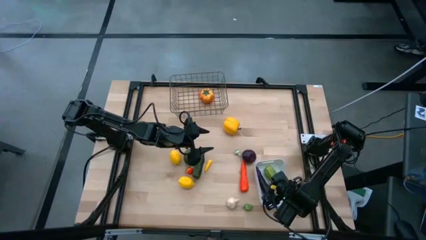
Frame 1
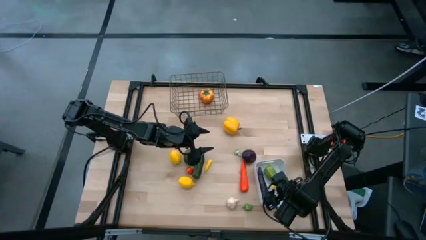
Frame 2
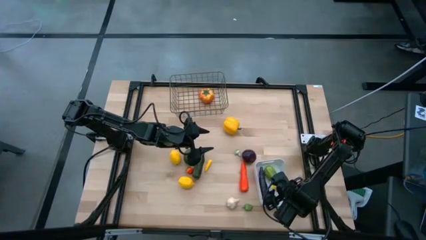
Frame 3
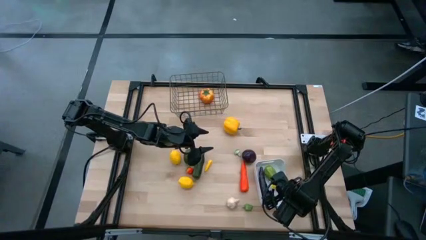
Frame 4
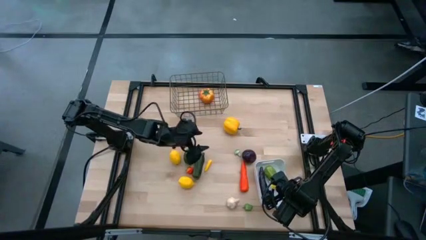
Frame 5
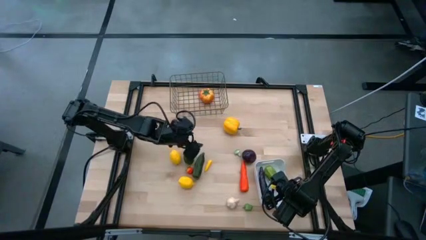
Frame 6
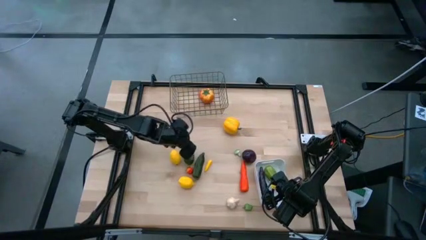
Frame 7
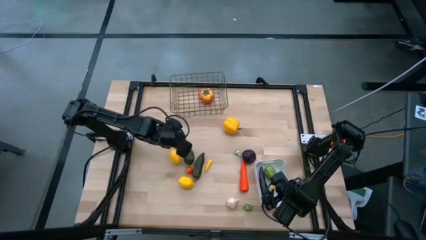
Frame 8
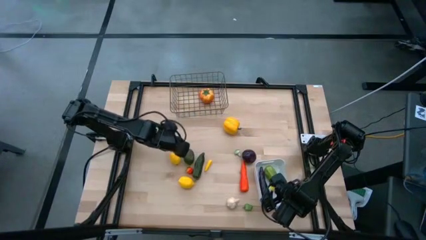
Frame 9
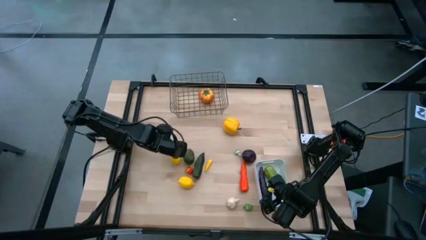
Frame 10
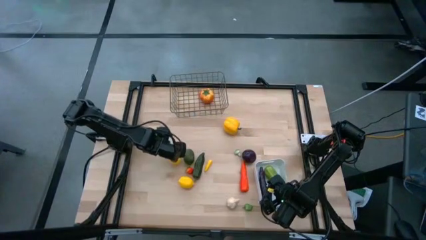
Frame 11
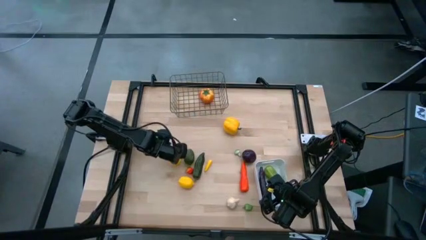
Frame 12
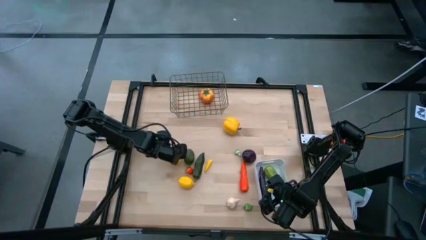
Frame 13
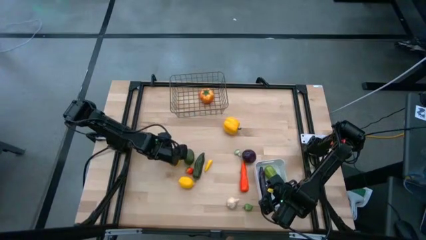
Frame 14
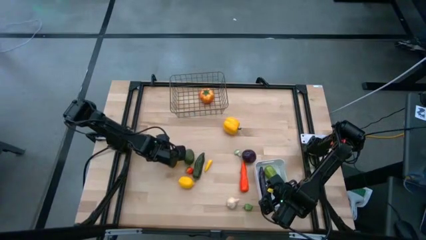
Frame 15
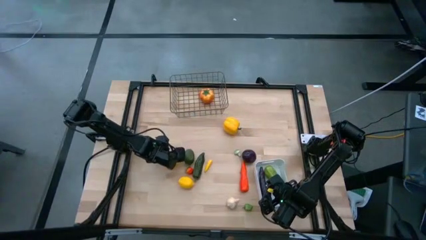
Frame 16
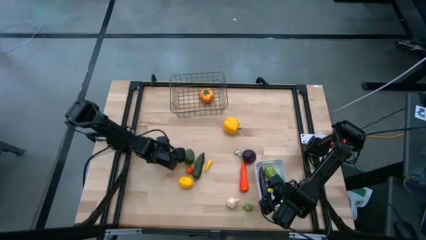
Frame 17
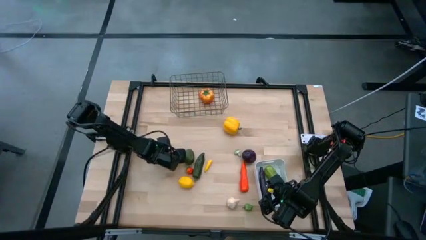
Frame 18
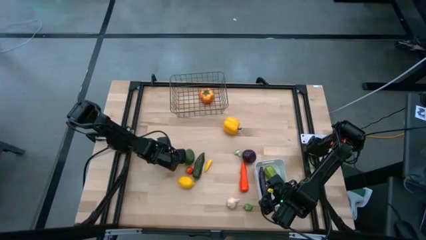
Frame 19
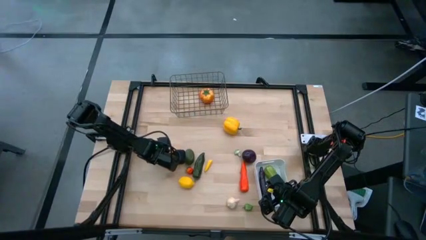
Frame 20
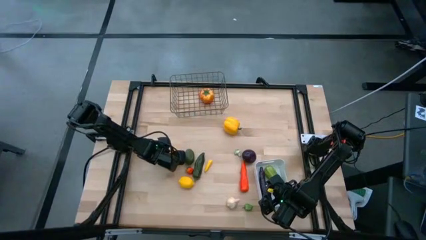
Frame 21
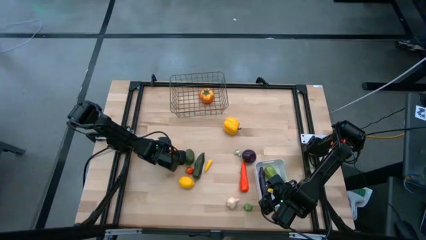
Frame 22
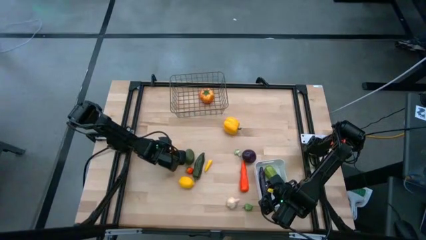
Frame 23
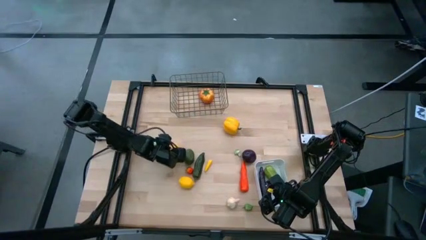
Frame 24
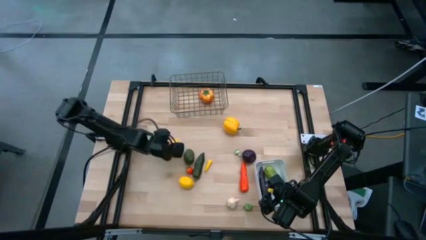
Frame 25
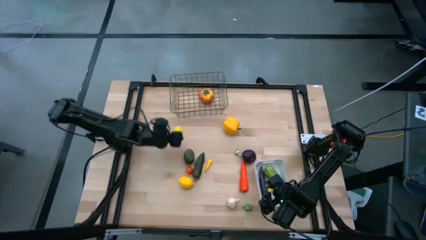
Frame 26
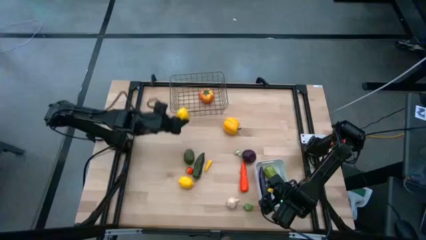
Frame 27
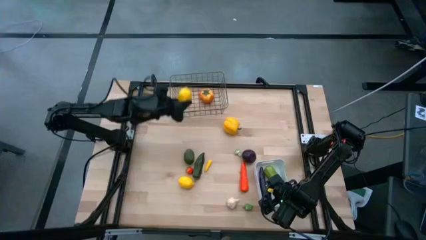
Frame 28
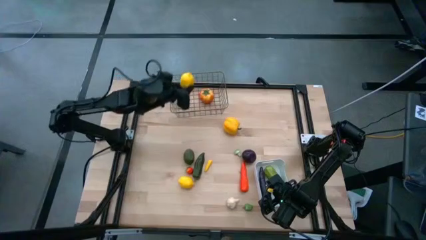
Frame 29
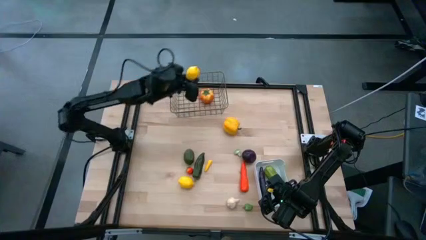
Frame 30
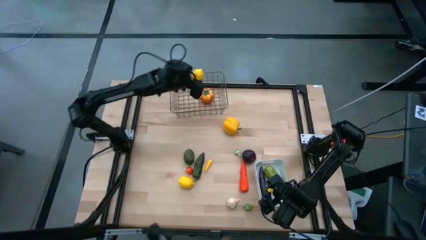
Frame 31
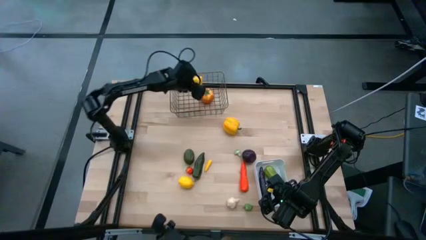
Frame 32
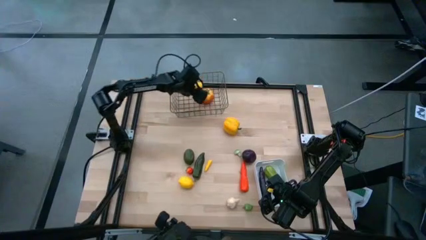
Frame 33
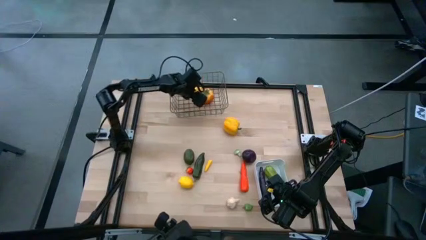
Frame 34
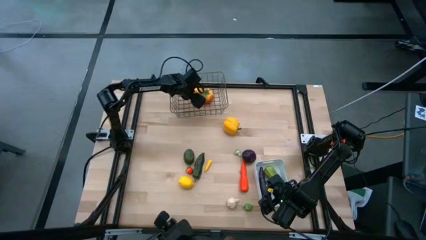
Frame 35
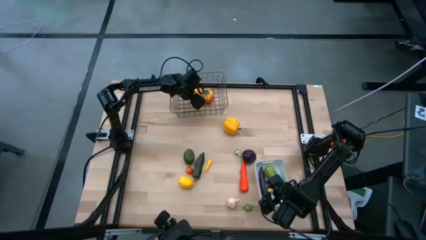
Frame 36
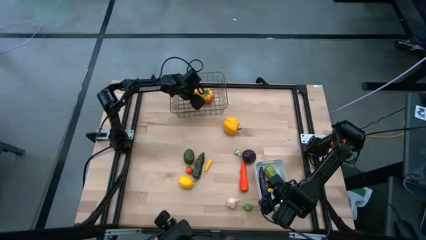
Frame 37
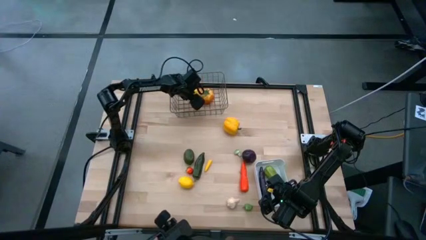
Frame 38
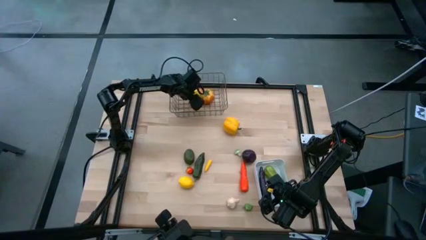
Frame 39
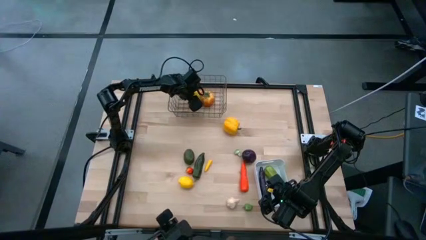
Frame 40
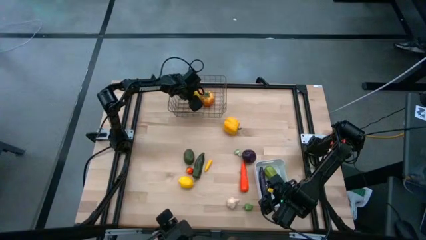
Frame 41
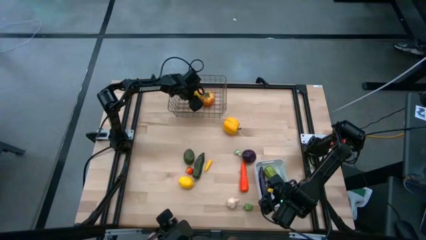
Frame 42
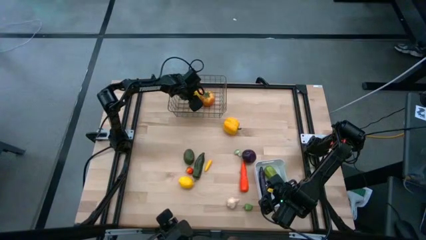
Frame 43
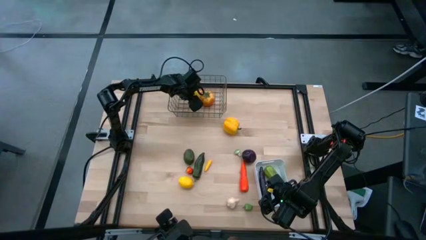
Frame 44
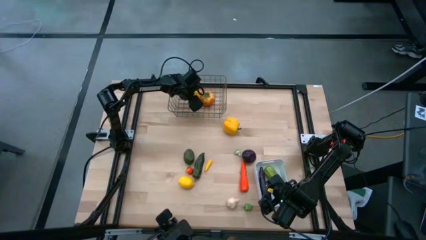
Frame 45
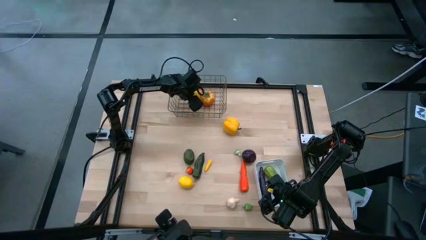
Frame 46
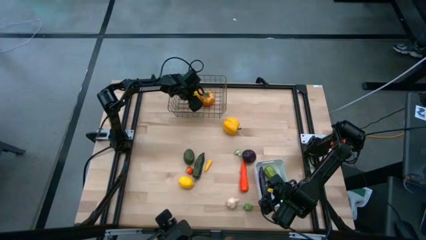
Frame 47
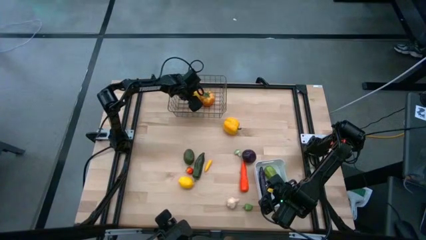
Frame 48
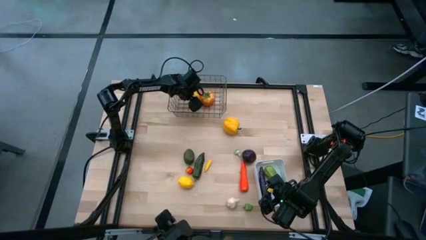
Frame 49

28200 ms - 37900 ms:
Task: Sort produce into baskets
Put the top lemon into the mesh basket
